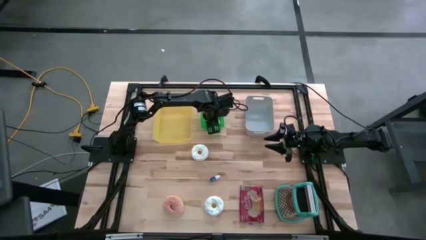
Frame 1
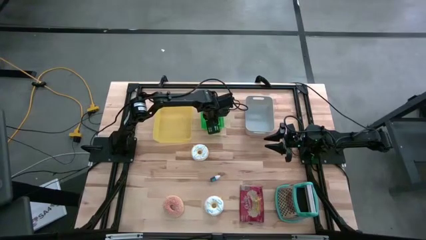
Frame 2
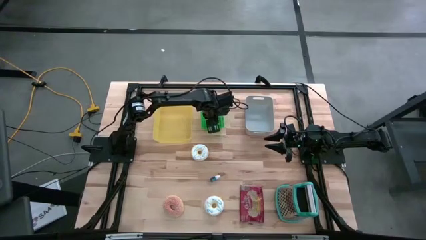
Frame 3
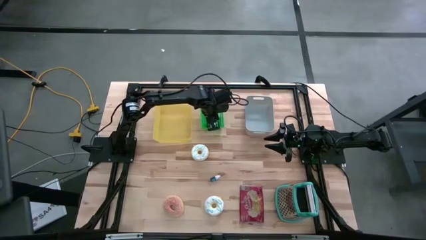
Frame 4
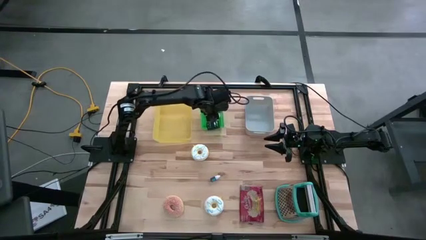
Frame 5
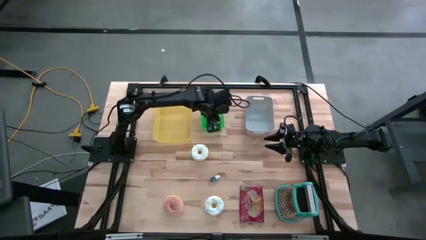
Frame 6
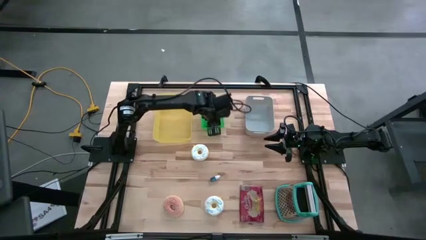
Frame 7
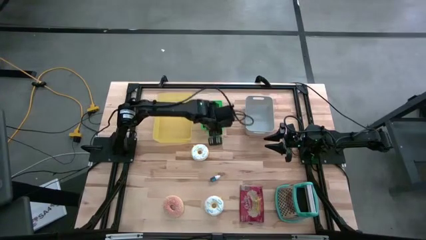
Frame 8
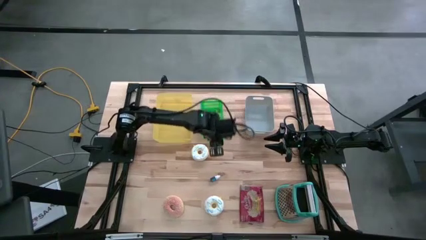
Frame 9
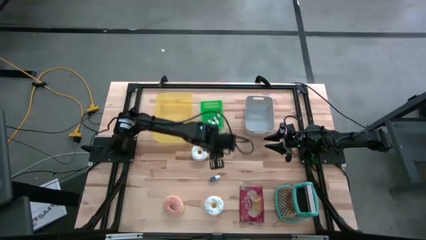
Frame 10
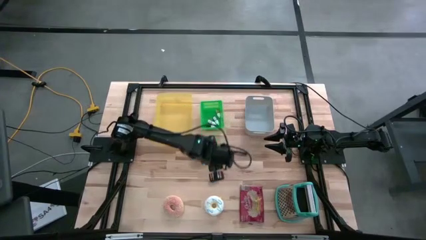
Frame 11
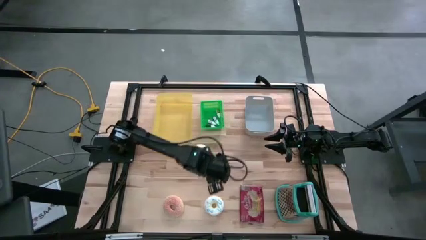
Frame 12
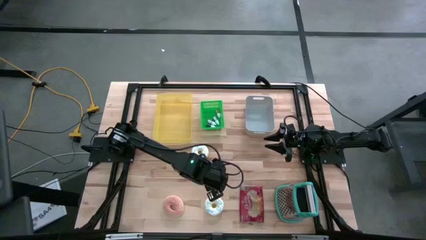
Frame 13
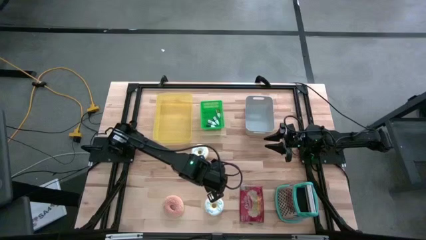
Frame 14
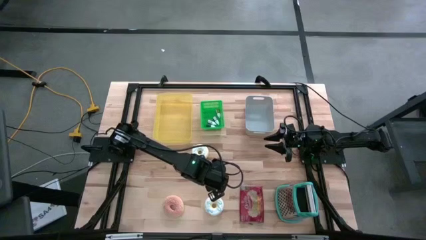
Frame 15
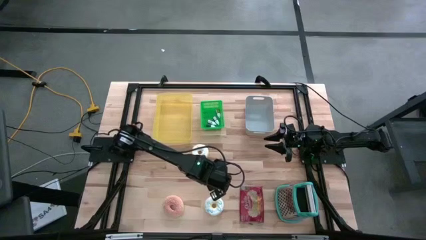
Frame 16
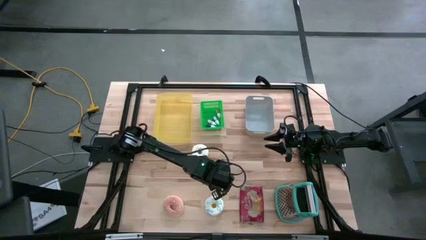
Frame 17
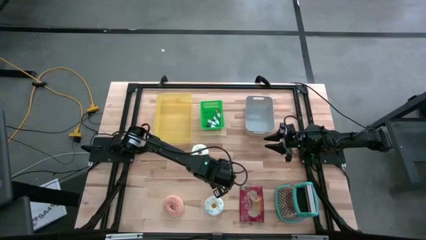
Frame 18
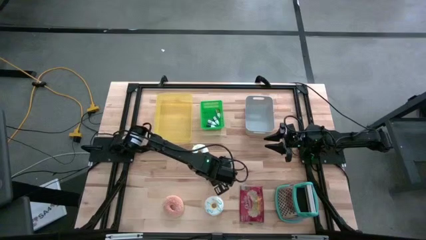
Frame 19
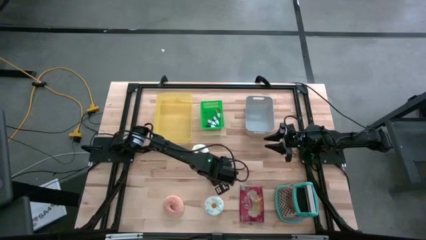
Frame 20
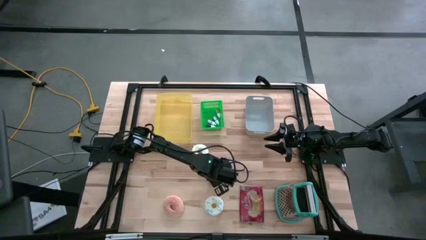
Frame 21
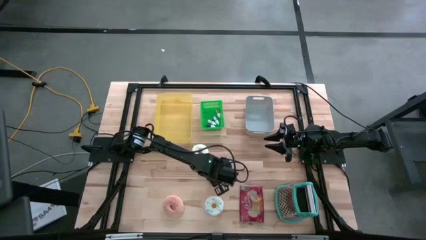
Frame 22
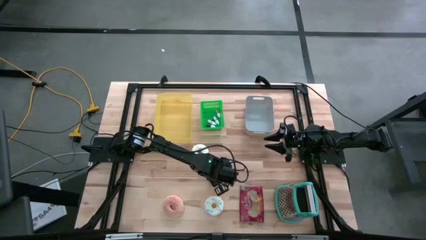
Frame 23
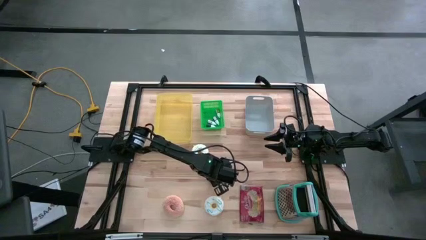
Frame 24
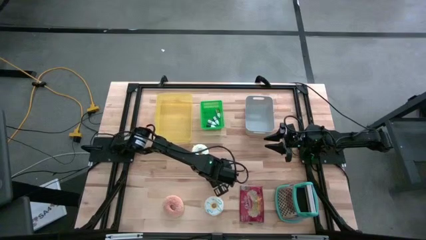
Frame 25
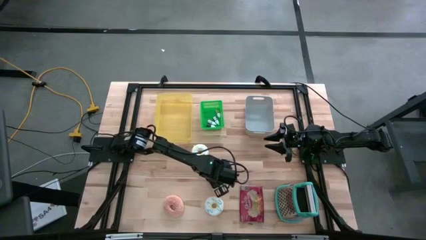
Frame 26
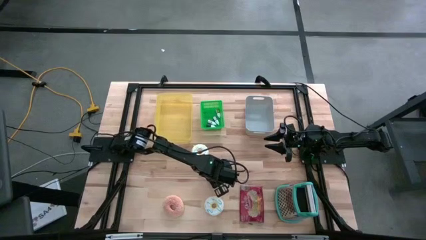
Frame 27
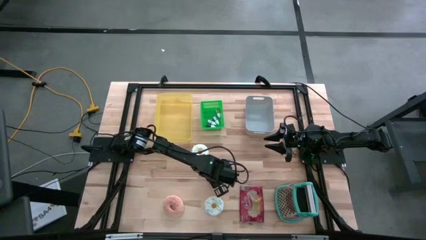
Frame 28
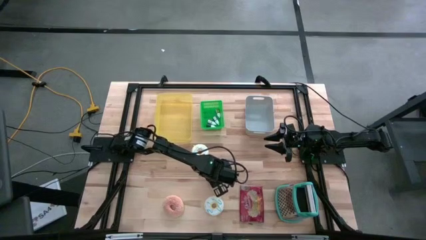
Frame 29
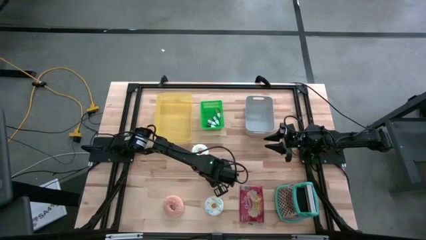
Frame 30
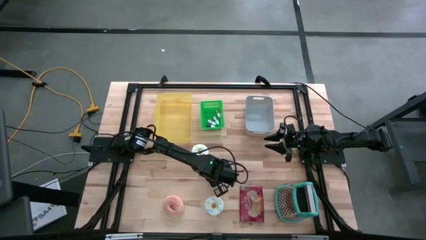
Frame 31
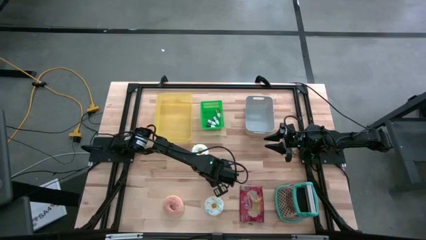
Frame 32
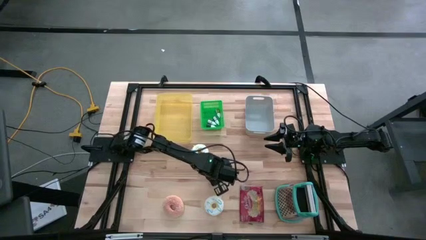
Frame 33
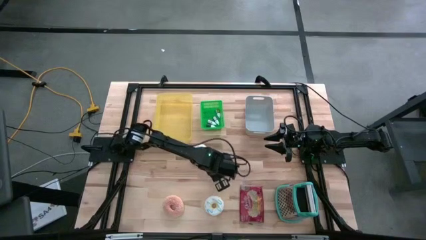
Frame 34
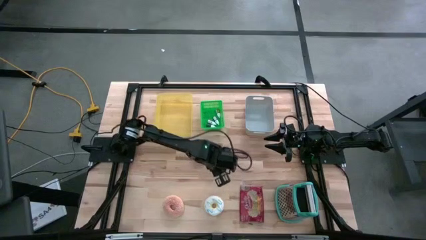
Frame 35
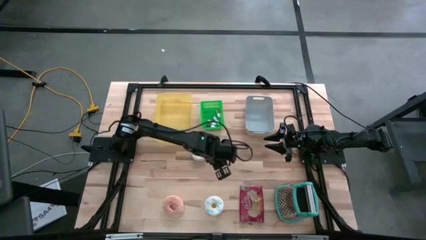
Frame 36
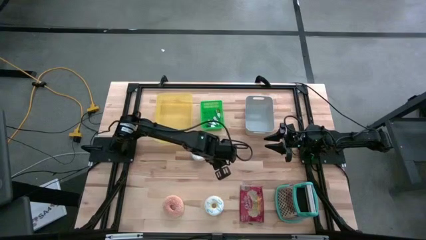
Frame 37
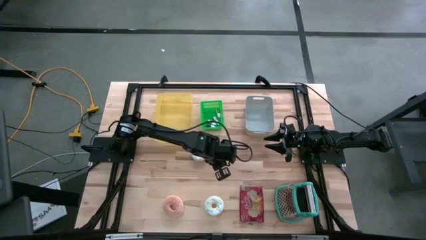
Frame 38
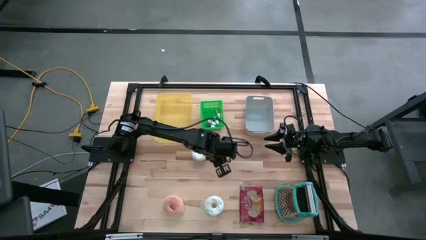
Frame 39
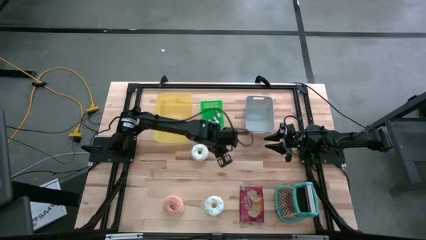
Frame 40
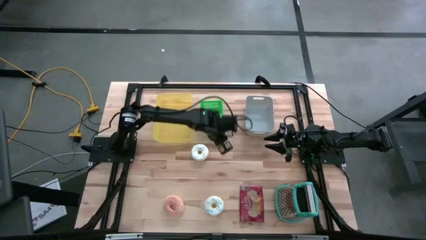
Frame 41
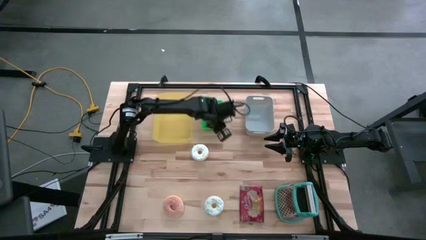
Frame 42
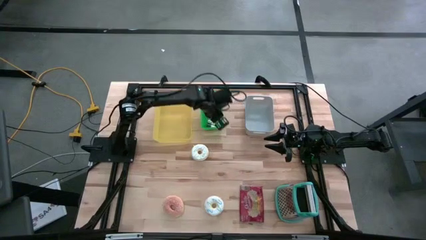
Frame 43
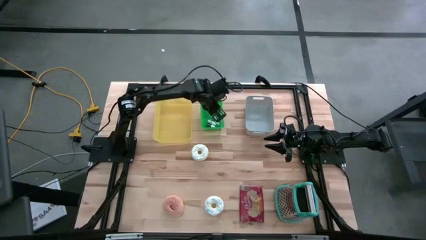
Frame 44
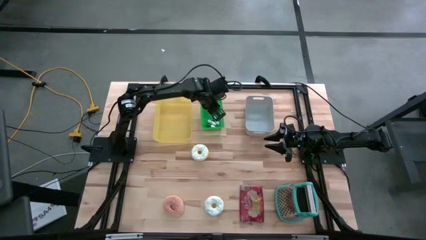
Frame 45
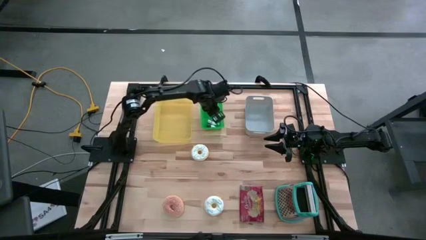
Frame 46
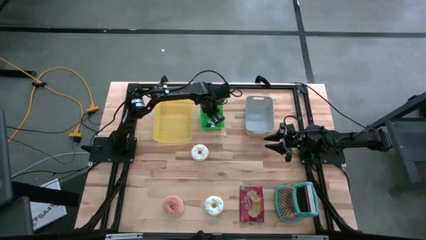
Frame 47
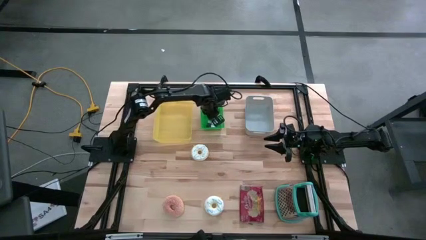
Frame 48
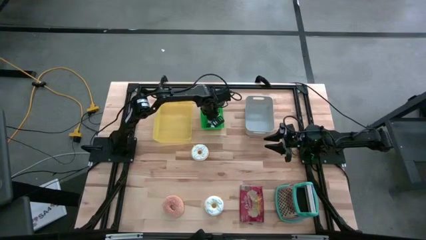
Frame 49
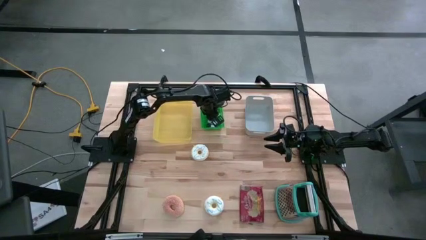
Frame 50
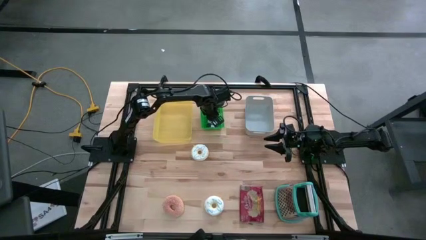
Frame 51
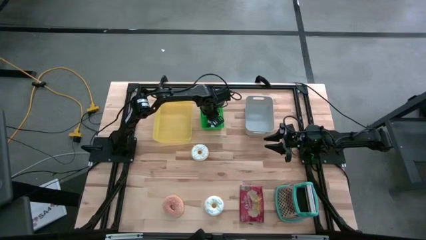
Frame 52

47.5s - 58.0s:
Put the blue food coloring bottle into the green bin
